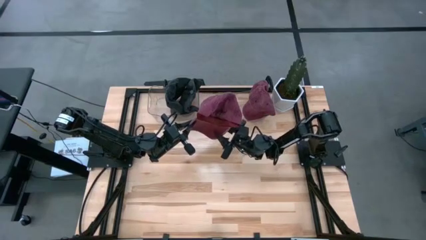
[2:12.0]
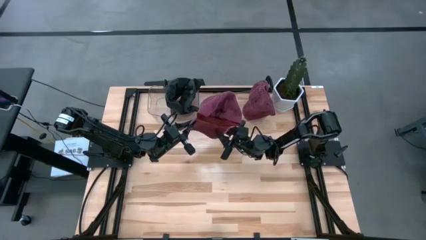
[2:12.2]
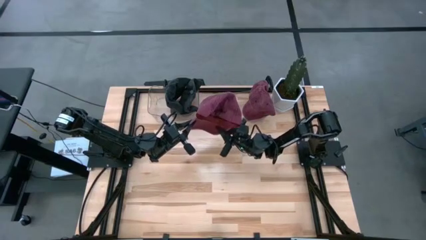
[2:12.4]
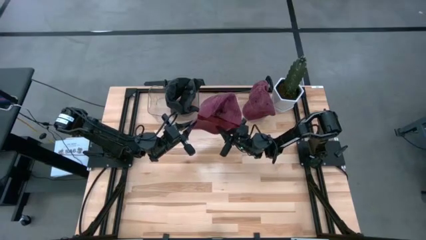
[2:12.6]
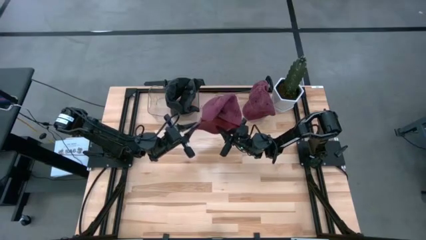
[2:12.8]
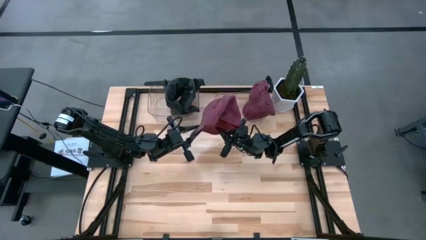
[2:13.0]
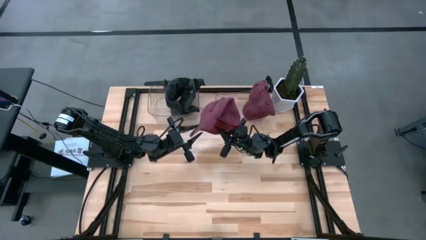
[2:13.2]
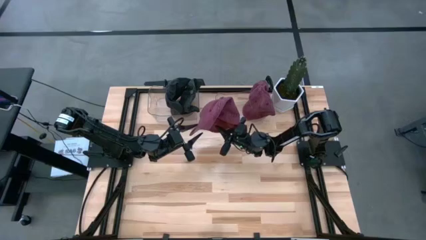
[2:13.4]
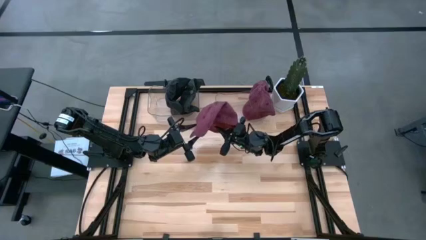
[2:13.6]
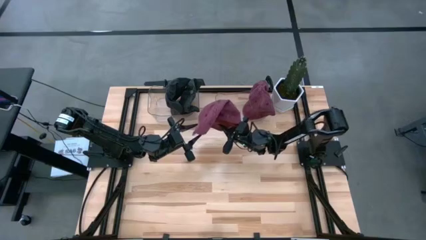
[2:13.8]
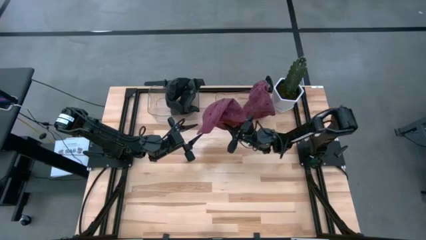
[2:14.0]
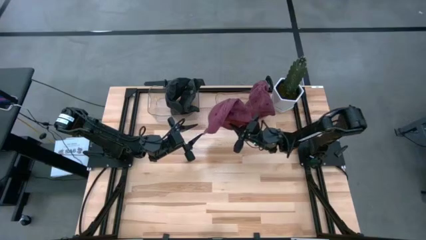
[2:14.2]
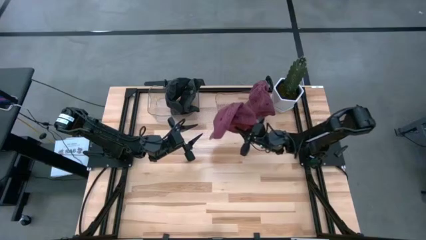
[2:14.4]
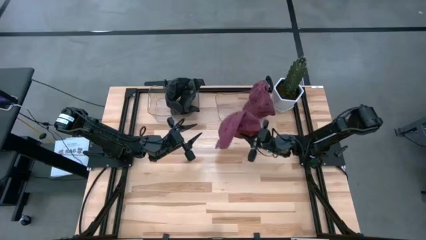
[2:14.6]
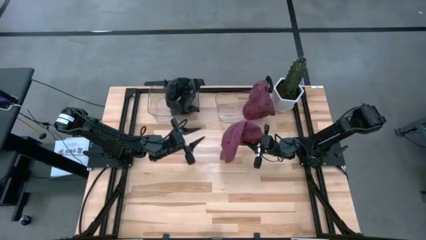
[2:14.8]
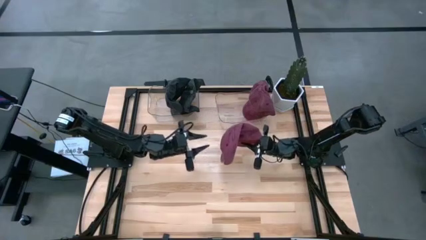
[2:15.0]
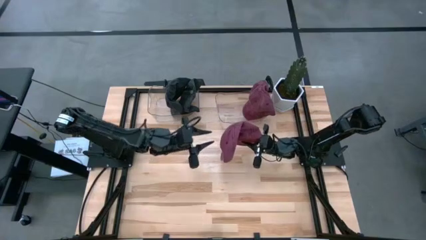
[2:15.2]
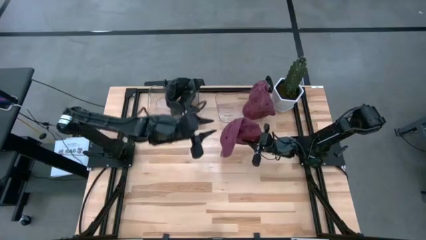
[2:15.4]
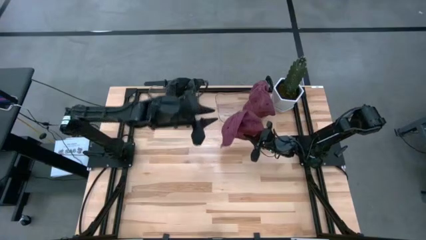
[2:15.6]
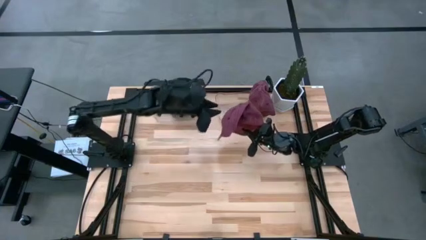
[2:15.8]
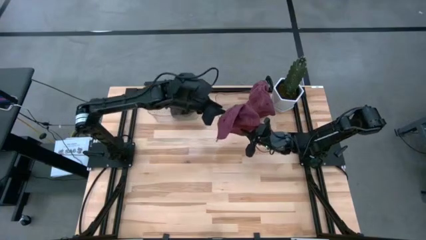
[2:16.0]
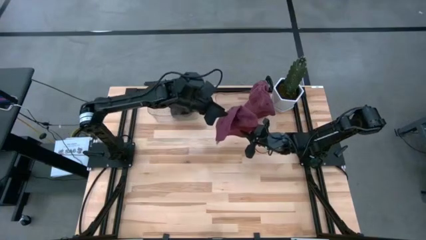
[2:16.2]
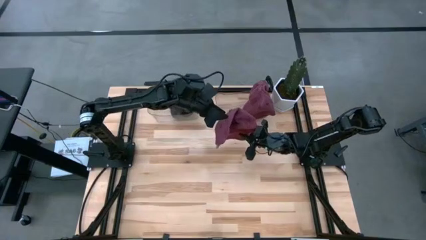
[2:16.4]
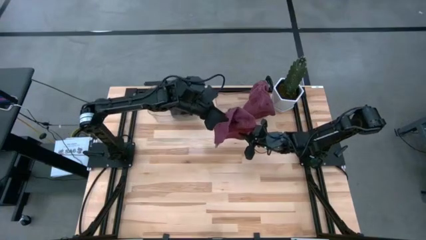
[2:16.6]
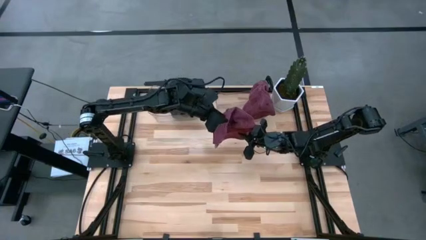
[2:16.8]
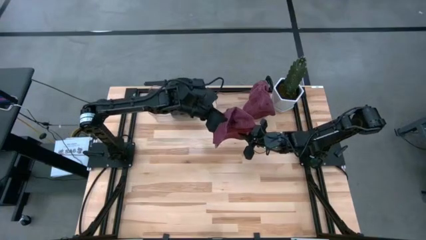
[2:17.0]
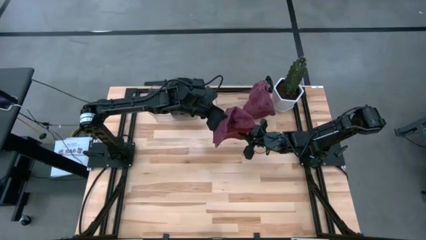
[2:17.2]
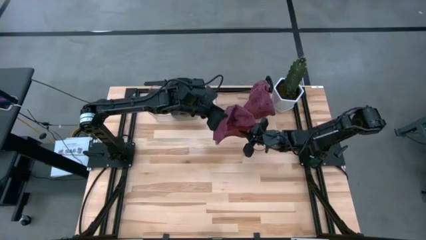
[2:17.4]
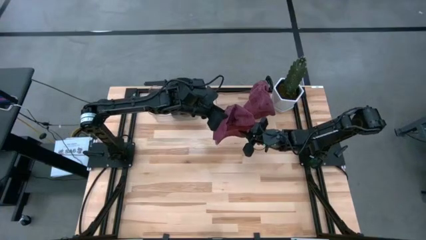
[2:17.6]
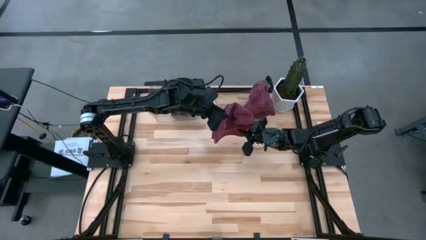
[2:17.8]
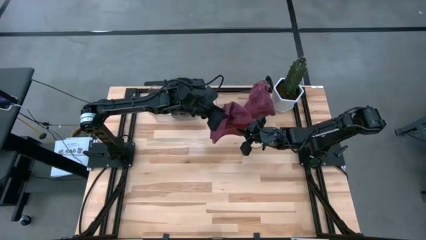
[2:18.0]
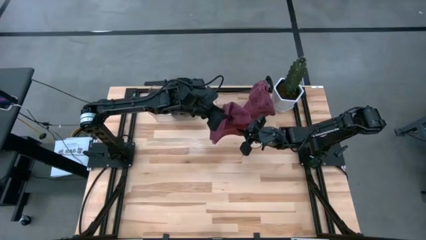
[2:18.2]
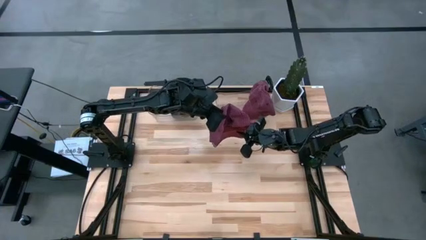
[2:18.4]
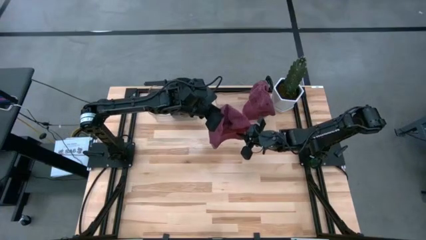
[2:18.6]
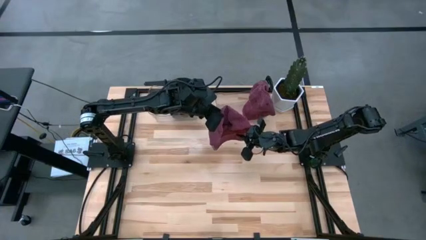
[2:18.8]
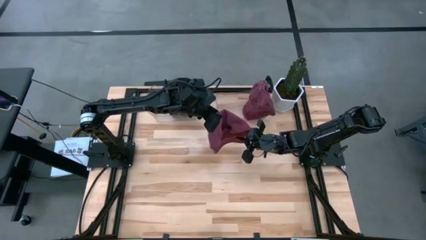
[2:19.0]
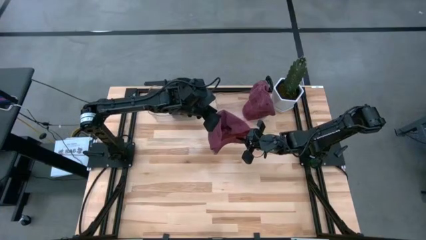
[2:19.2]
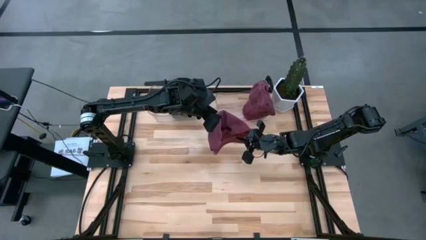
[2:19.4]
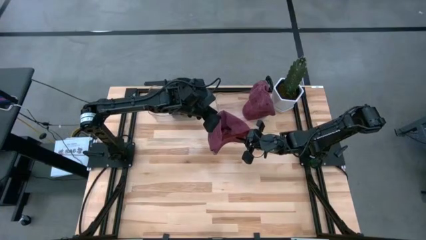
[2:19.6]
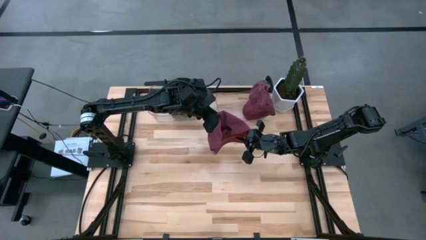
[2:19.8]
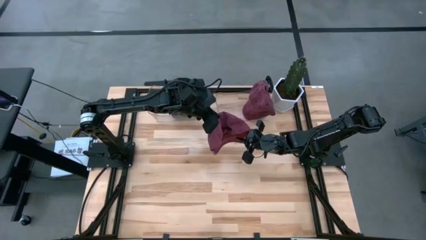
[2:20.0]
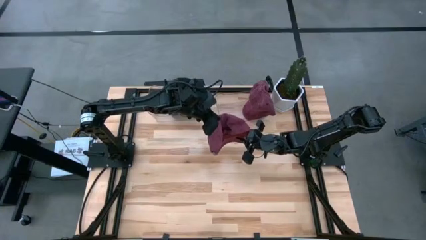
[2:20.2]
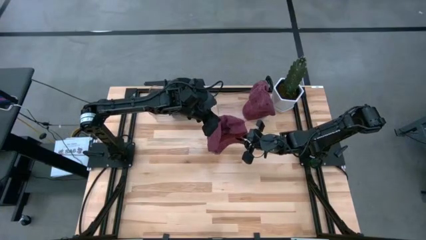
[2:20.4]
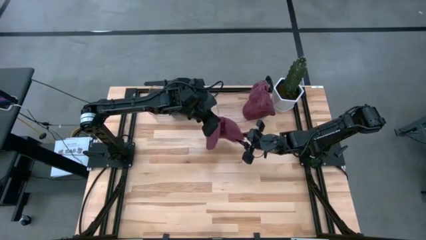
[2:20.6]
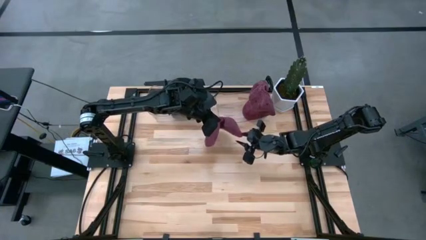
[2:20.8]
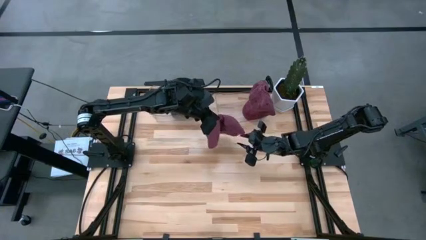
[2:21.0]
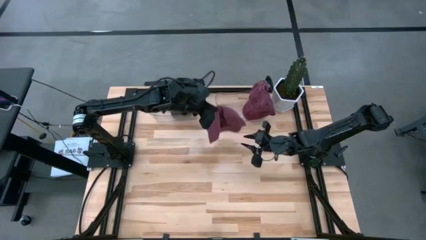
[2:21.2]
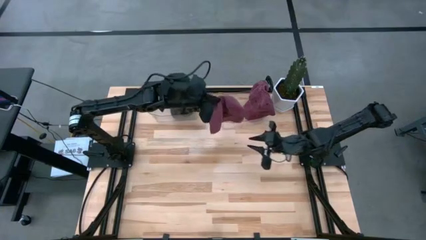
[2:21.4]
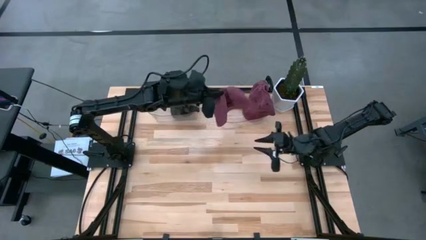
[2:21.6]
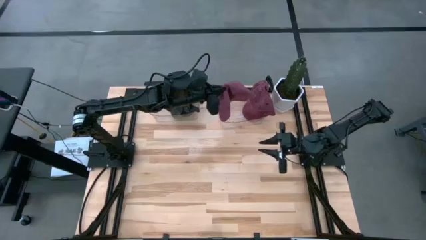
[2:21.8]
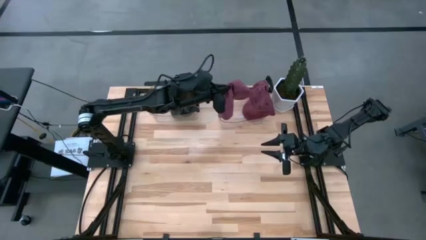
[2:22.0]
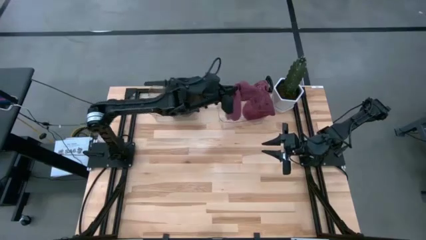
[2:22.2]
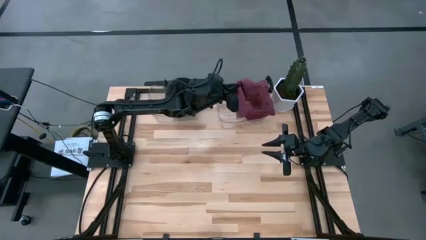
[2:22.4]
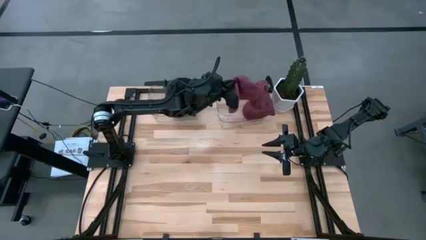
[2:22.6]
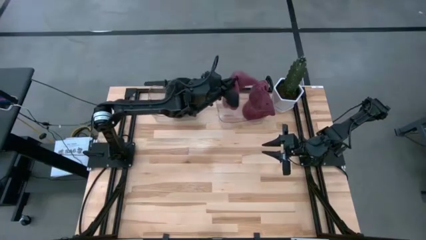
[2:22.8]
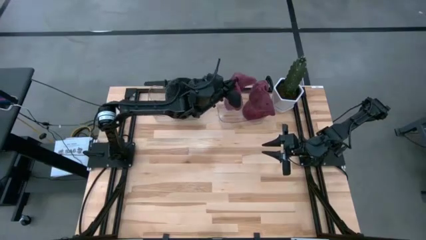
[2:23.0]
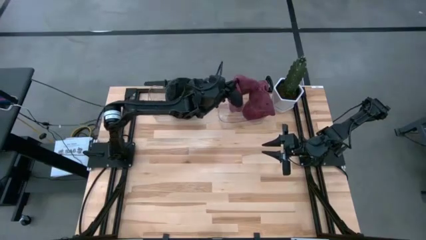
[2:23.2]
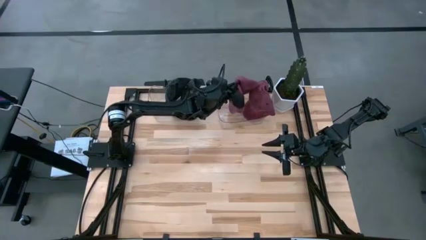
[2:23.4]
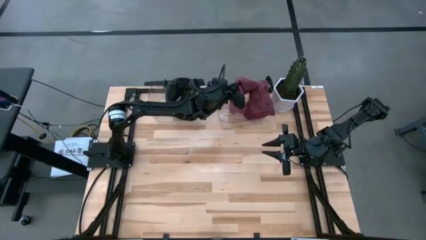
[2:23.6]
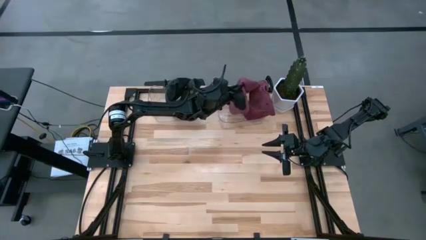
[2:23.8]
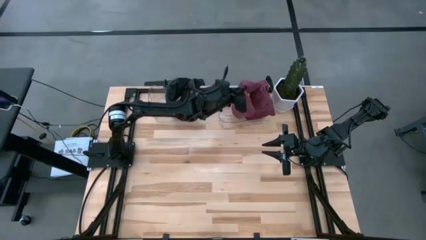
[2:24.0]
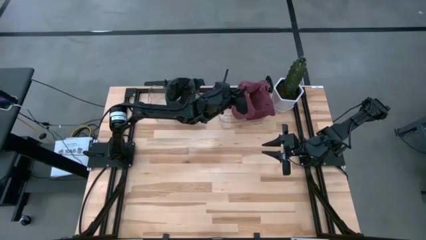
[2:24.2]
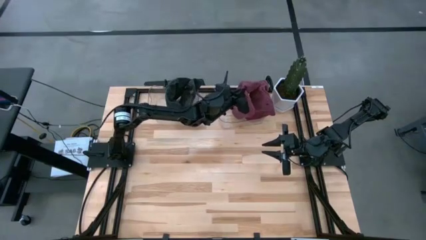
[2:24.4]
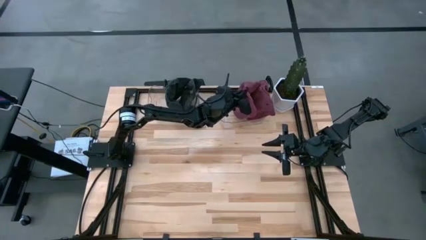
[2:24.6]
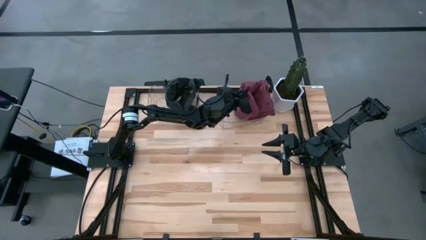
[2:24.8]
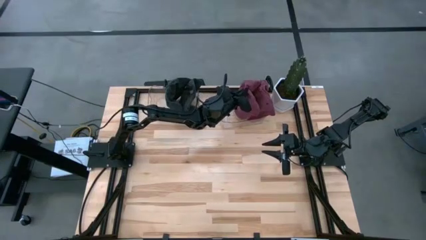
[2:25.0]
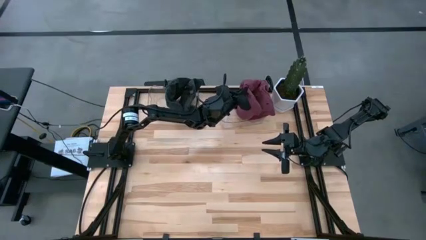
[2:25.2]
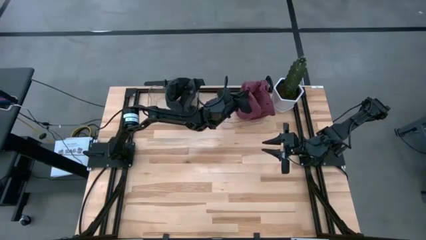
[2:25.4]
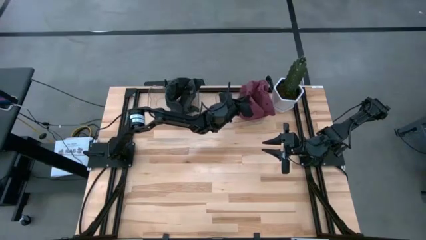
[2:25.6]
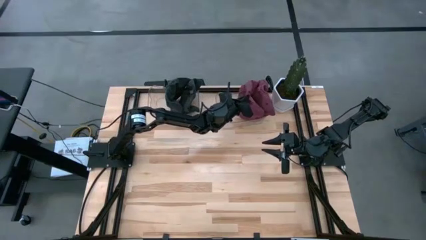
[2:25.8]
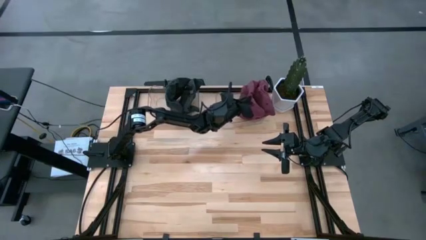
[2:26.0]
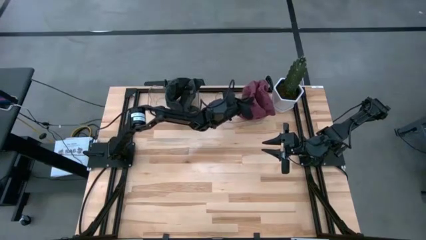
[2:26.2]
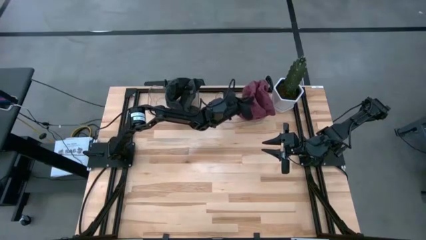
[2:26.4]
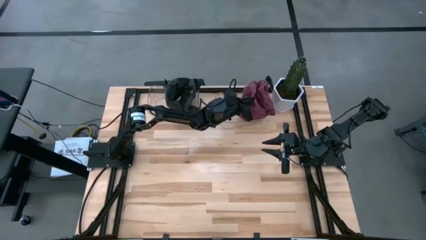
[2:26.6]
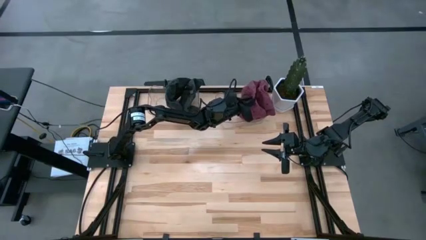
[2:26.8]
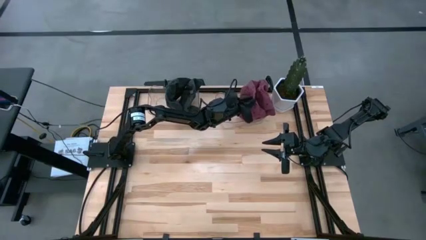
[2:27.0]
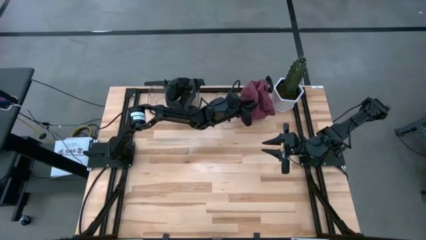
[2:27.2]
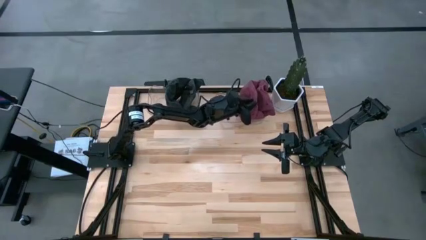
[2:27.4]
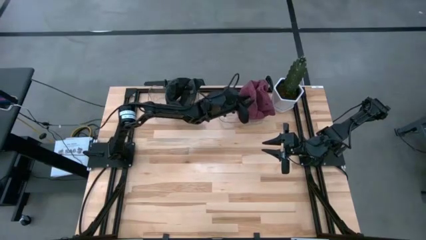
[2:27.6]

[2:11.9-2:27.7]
Task: Pick & Place hat
Put the red cap into the right transparent bin

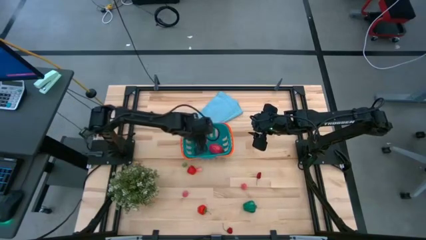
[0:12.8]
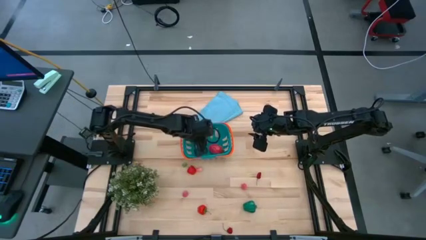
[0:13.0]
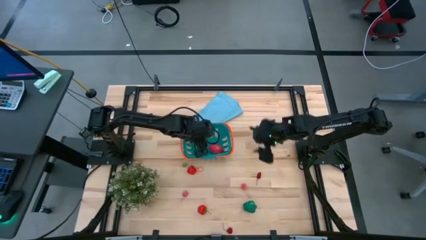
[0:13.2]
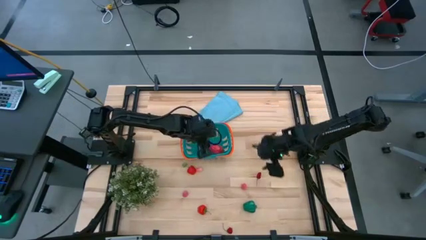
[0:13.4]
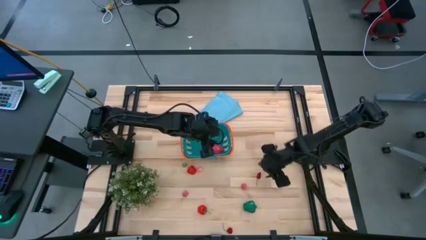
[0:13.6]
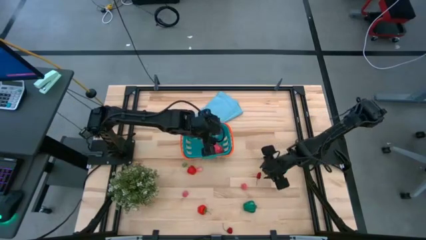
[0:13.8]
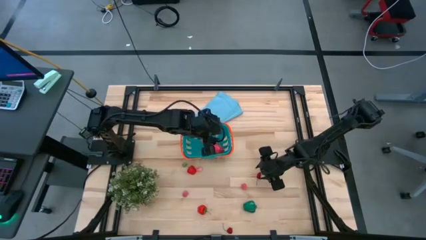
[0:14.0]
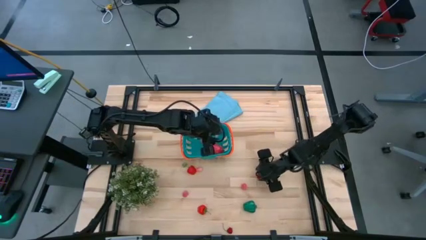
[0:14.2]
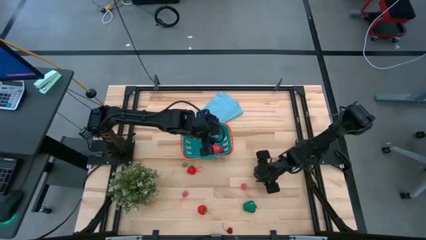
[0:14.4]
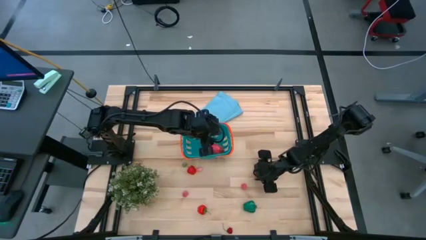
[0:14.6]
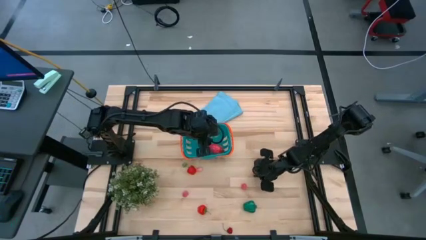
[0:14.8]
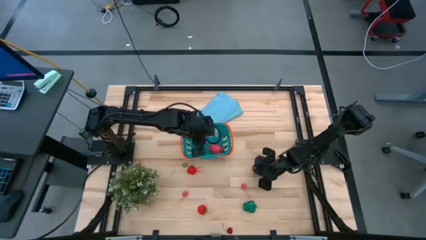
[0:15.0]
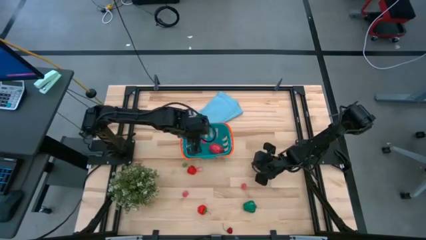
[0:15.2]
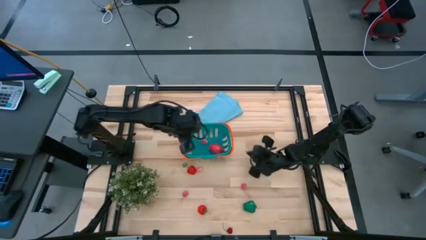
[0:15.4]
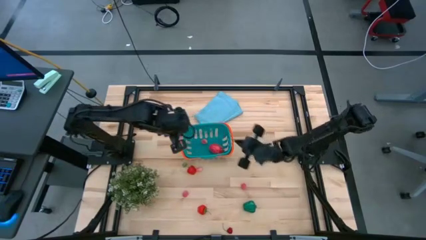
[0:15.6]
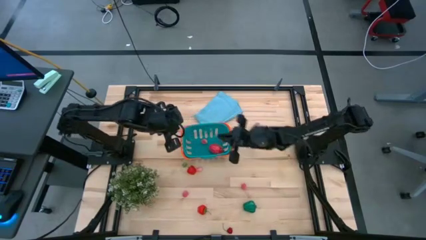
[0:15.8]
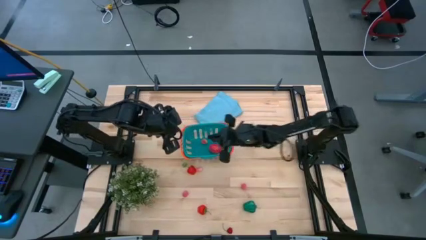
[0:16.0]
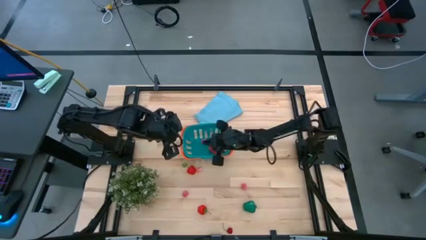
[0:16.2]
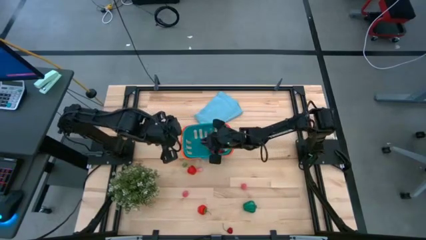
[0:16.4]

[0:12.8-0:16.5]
Task: Pick and placing Produce into tupperware
Put the red cherry into the bin
